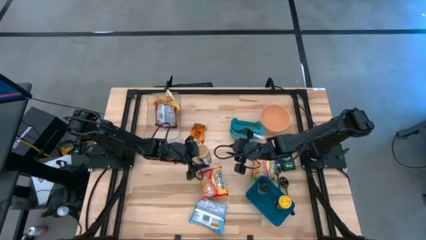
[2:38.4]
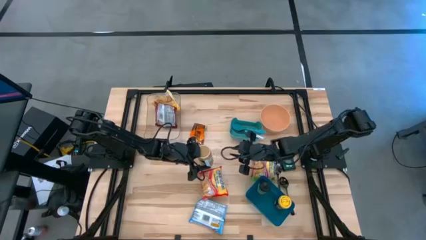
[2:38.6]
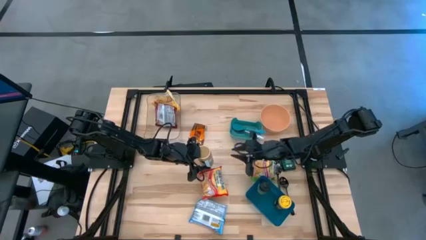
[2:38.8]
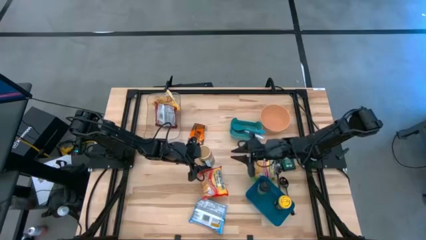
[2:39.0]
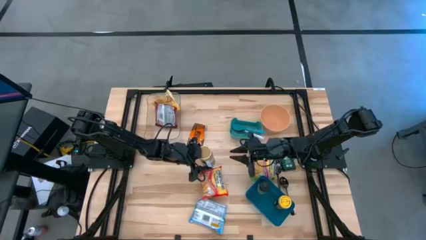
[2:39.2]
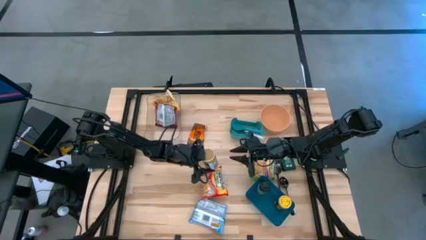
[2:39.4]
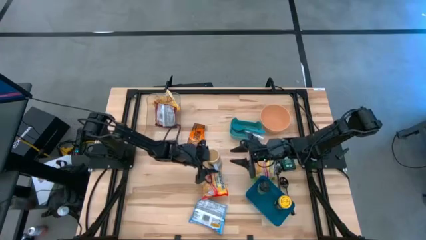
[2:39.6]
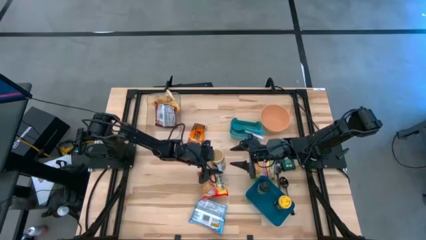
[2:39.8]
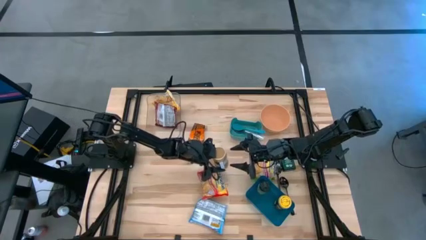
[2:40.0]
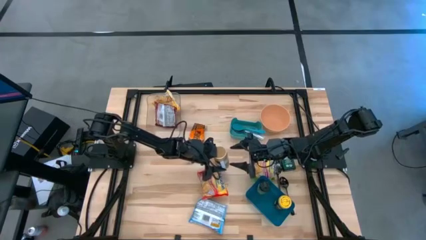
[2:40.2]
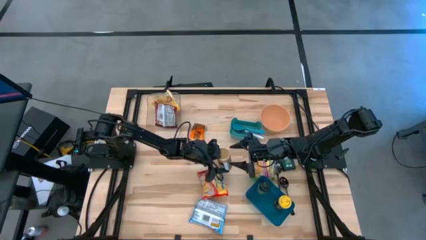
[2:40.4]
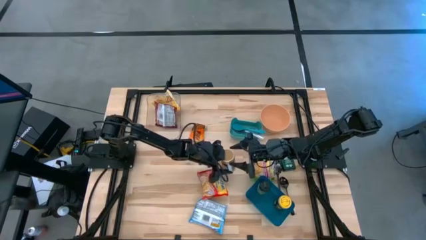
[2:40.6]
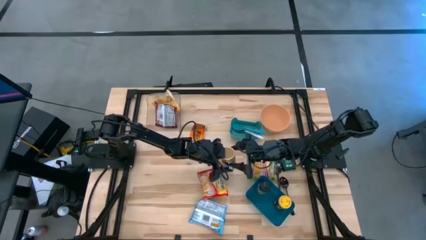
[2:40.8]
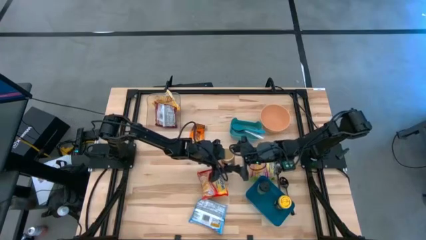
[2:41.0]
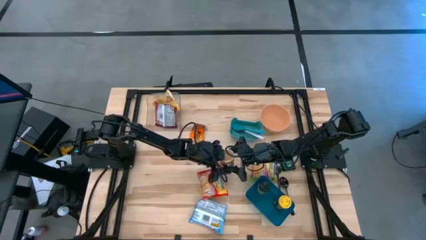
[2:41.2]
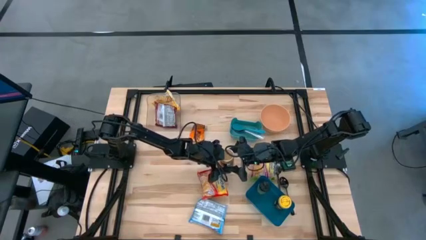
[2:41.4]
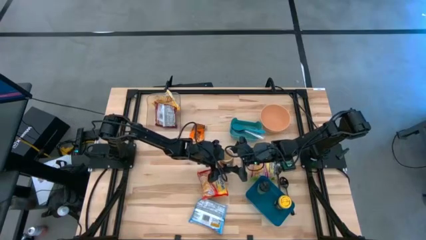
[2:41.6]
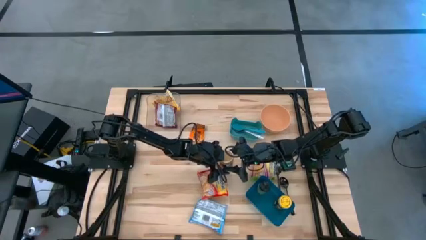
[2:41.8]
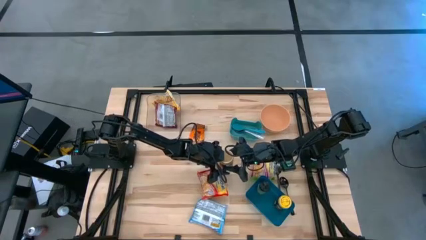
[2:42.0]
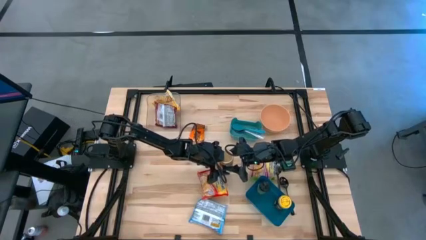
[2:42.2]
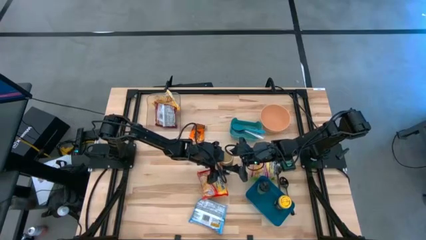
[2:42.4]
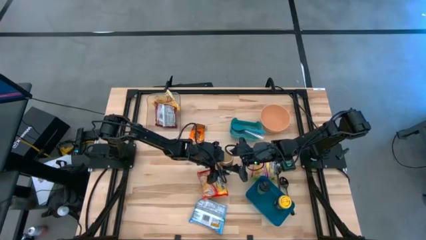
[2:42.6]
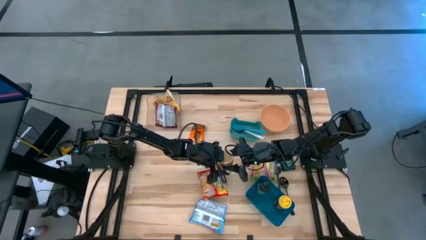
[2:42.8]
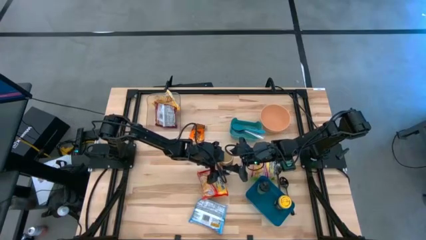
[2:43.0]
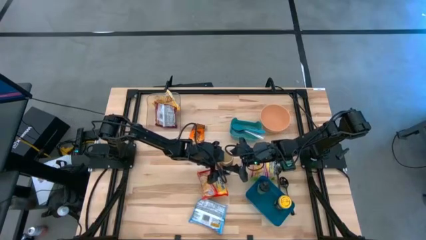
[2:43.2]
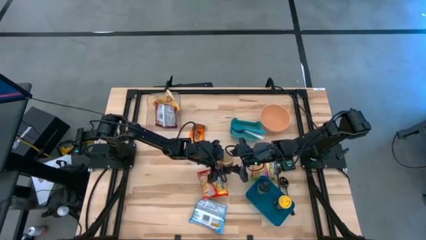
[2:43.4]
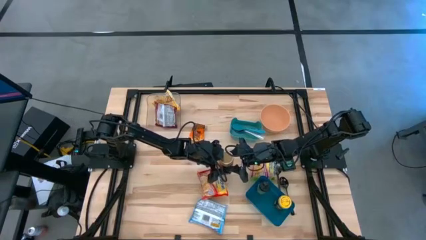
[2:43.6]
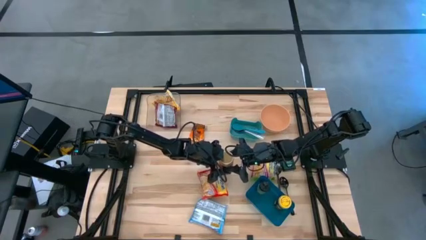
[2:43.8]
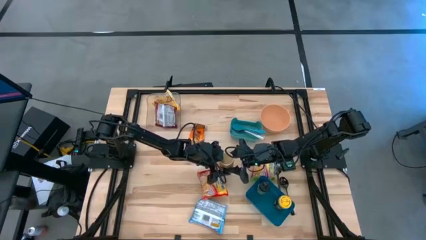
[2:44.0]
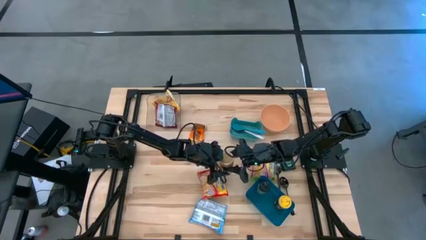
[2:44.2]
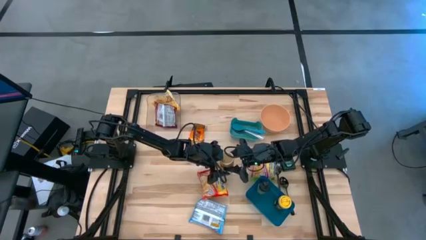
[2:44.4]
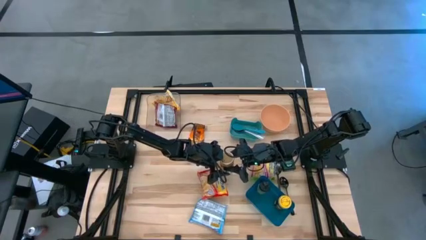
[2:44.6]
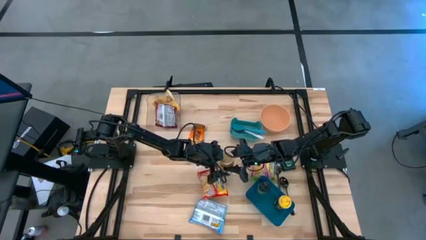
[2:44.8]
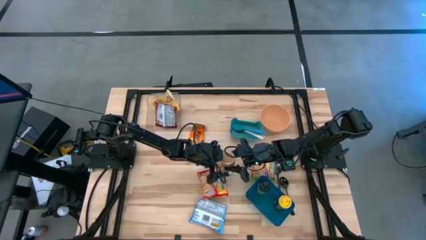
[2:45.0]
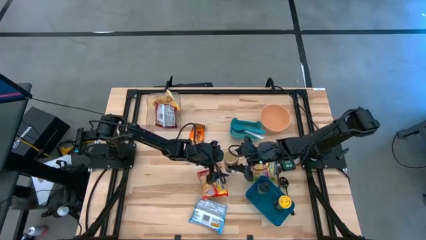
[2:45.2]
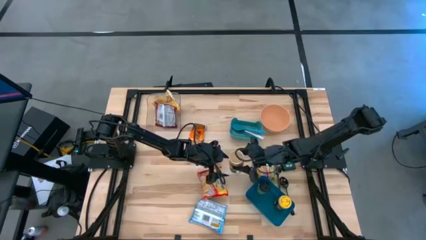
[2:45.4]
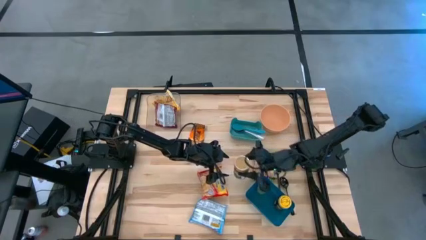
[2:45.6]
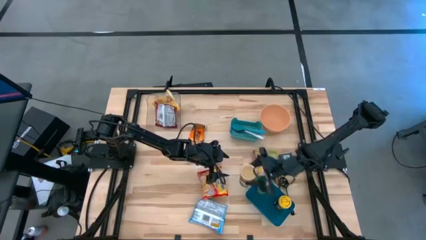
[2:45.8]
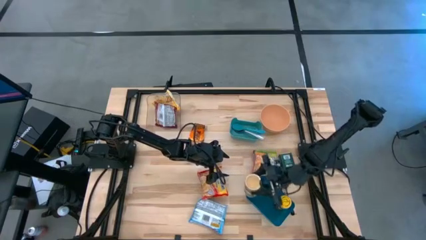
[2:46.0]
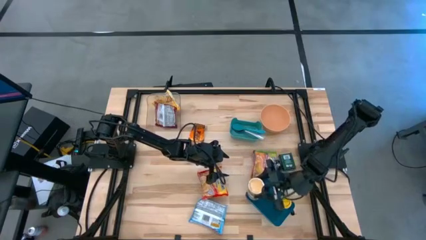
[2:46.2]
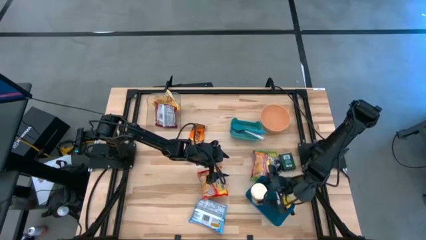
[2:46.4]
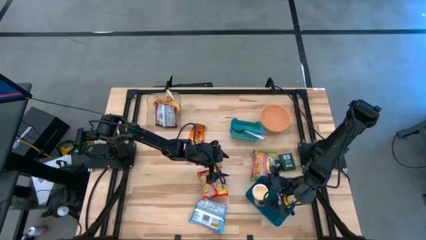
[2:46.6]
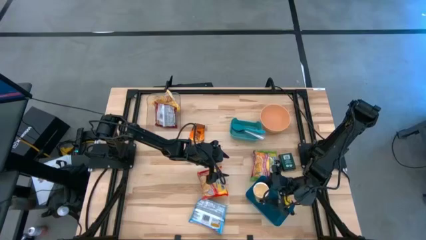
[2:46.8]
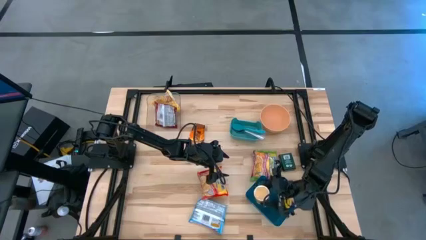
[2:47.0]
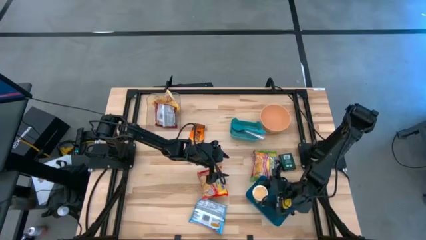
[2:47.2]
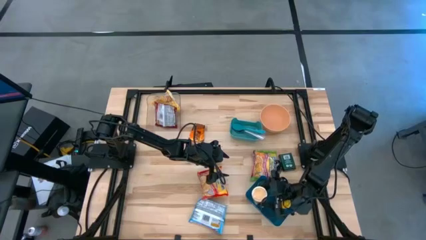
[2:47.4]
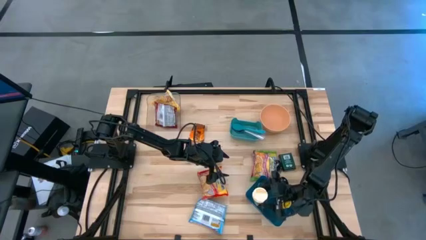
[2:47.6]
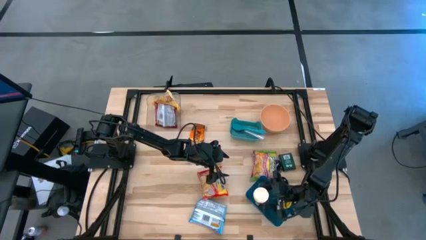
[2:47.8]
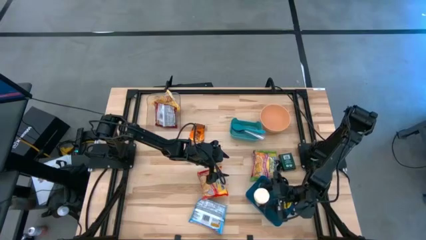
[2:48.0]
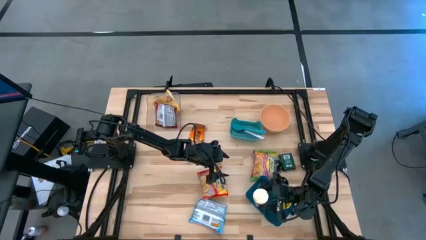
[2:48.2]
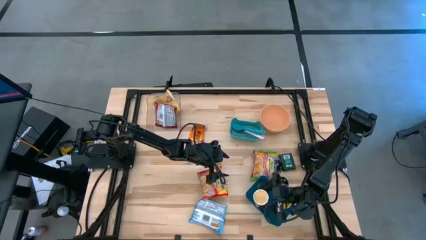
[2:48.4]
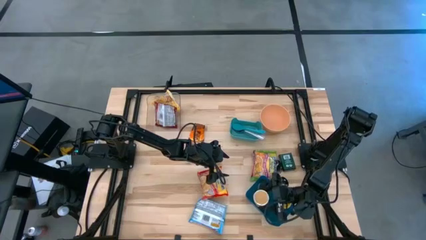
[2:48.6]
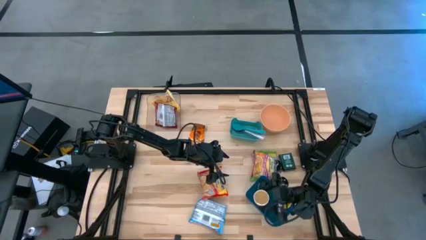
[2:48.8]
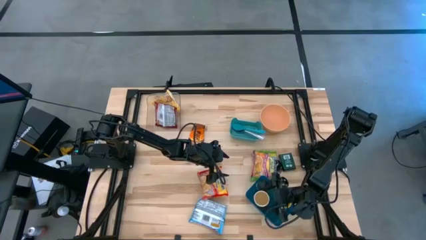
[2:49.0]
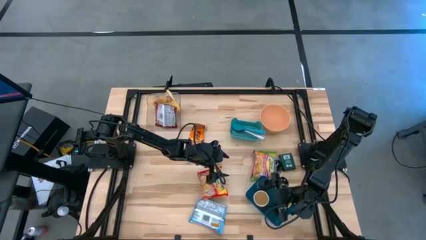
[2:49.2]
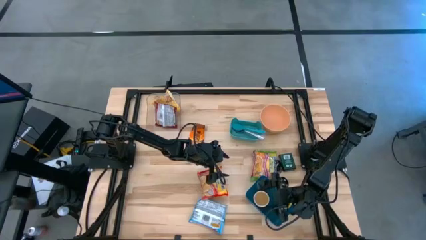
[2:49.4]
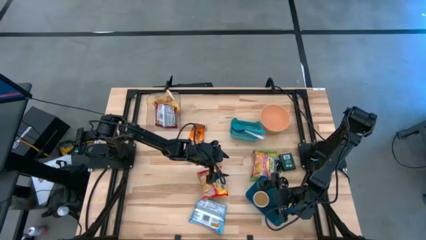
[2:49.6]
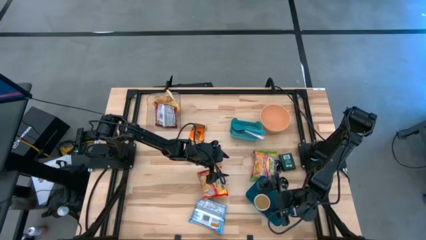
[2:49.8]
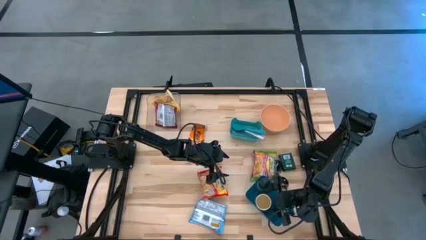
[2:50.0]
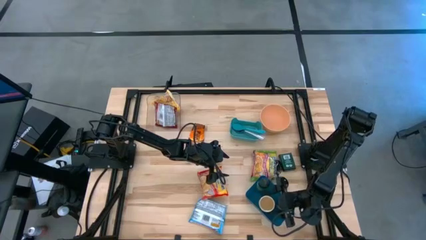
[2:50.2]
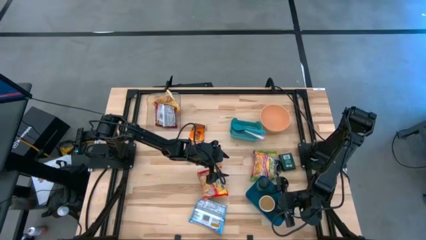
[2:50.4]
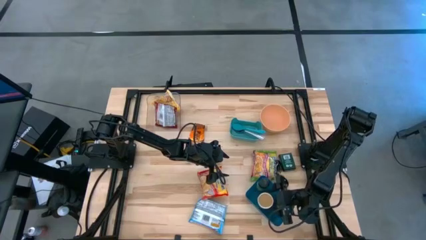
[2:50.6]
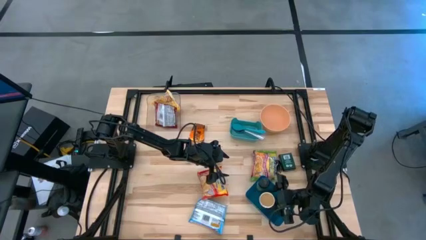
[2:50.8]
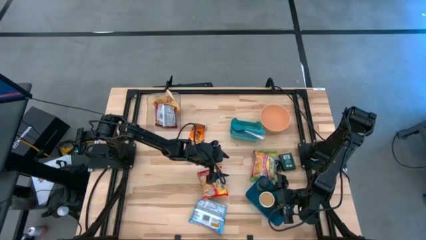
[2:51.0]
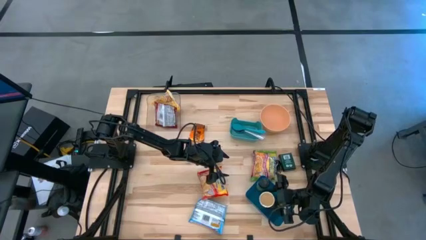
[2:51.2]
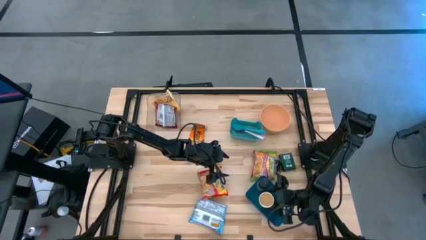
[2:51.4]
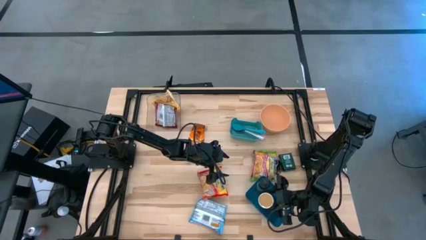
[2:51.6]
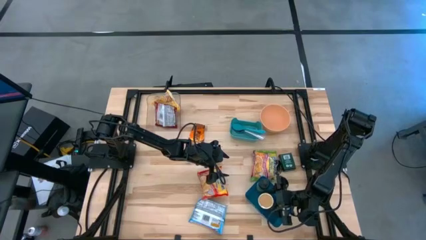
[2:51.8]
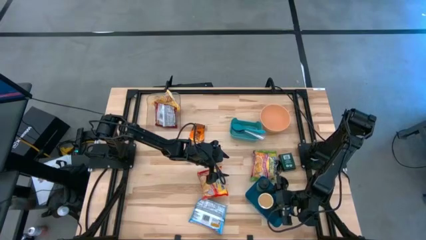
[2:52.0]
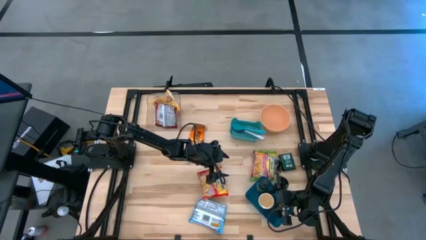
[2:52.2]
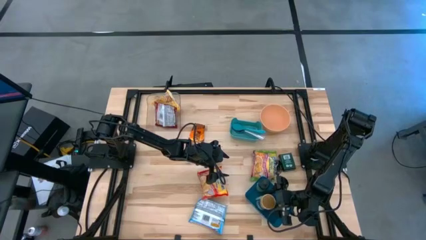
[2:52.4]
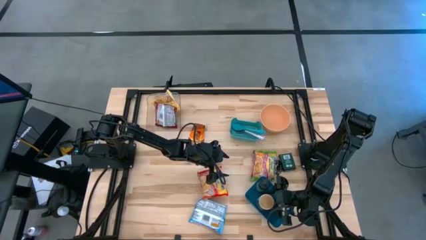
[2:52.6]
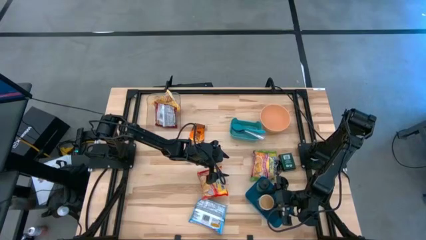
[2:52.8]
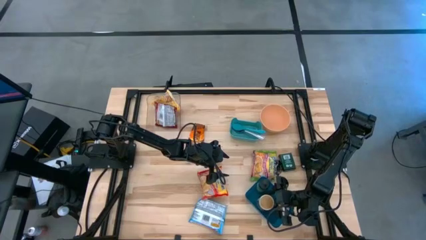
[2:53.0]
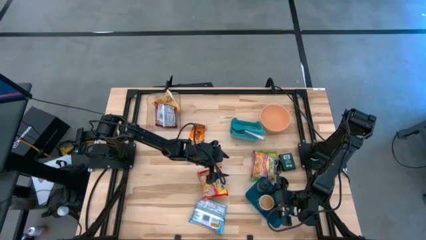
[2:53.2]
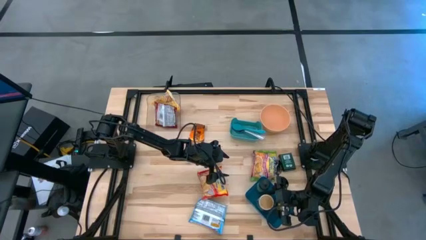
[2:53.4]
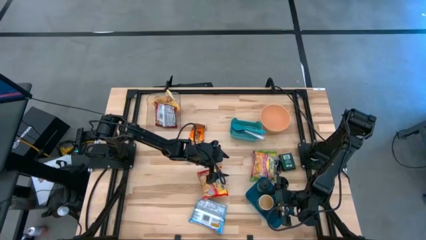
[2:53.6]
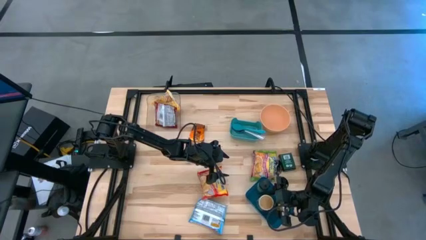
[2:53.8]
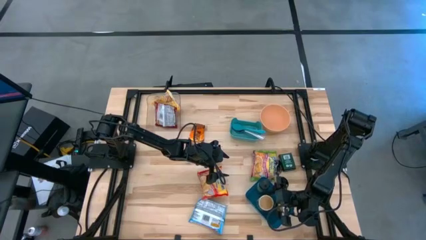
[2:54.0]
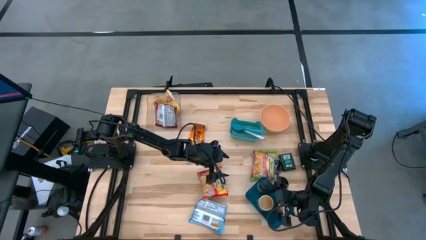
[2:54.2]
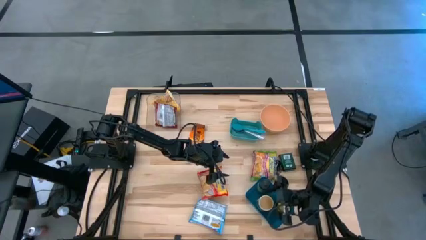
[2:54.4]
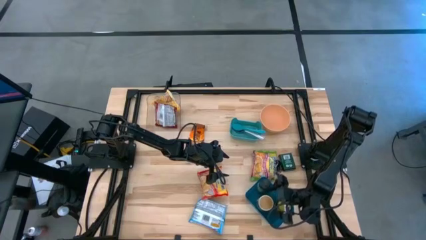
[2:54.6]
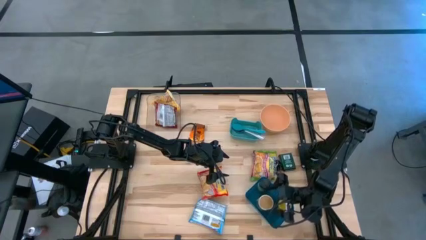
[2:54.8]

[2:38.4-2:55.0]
Task: Pick & Place Food Item
Put the gold seasoning bottle into the blue bin
